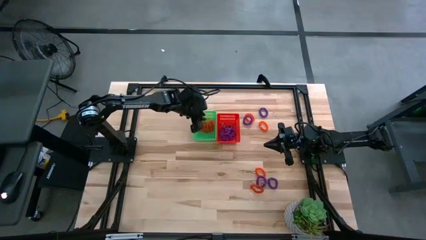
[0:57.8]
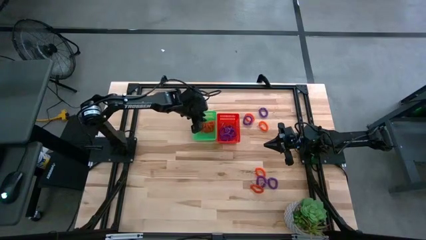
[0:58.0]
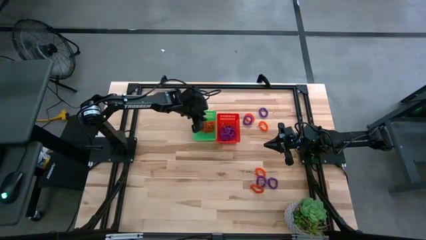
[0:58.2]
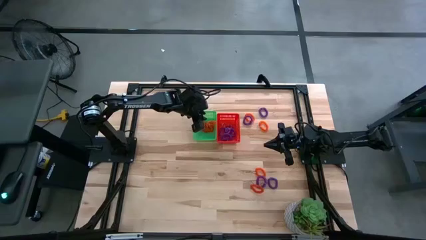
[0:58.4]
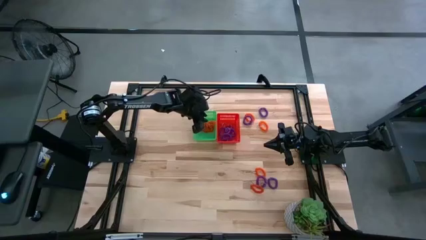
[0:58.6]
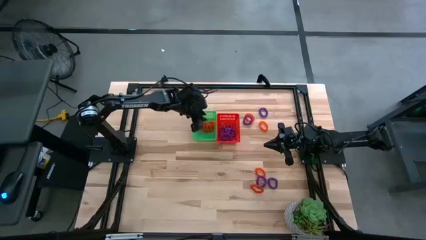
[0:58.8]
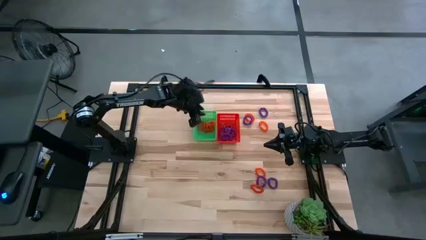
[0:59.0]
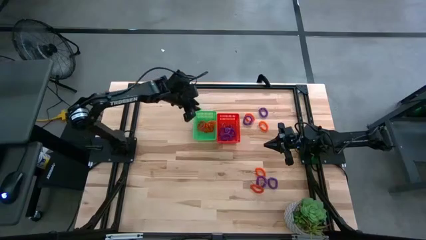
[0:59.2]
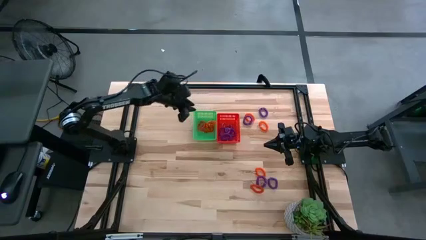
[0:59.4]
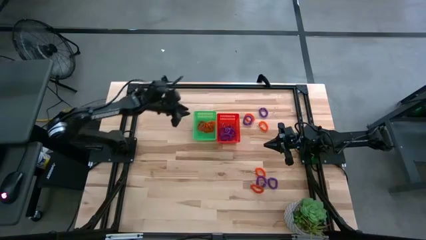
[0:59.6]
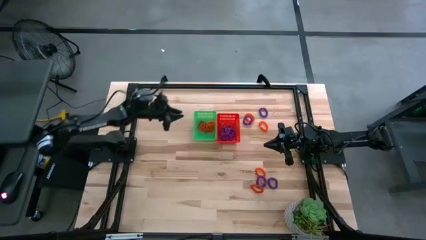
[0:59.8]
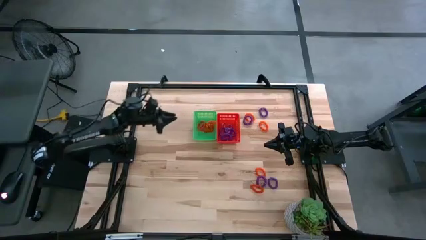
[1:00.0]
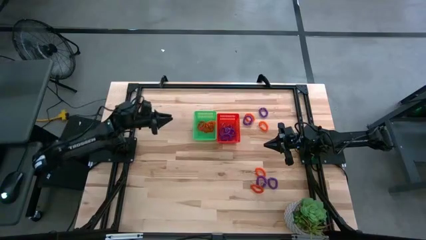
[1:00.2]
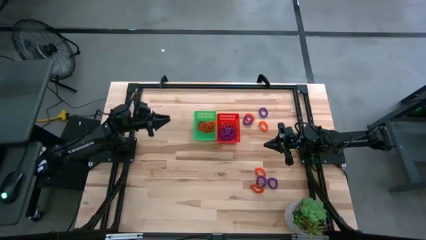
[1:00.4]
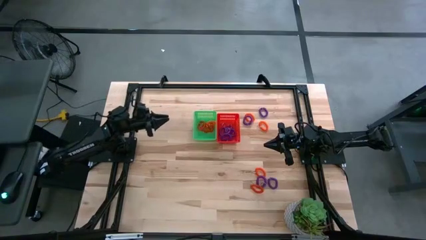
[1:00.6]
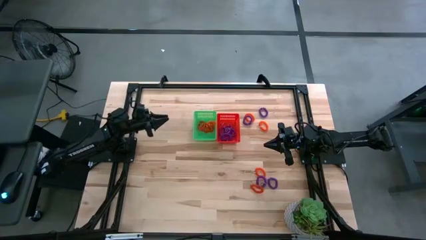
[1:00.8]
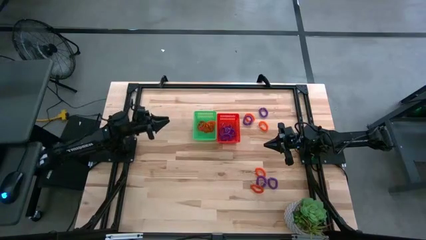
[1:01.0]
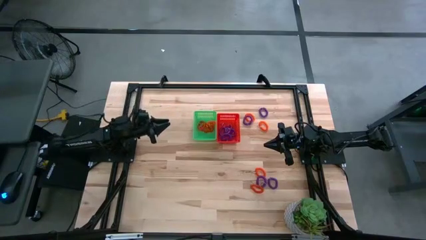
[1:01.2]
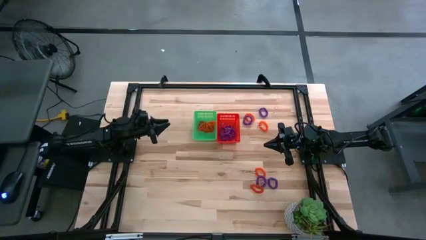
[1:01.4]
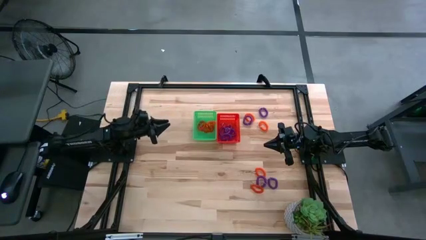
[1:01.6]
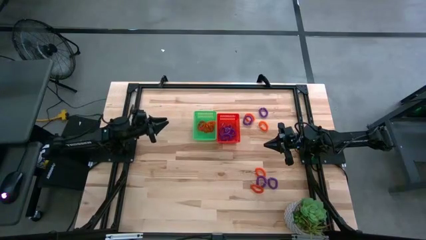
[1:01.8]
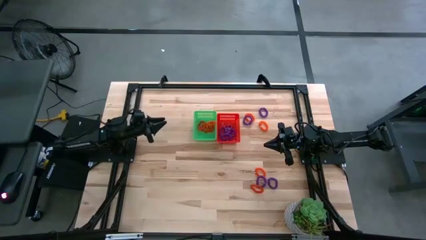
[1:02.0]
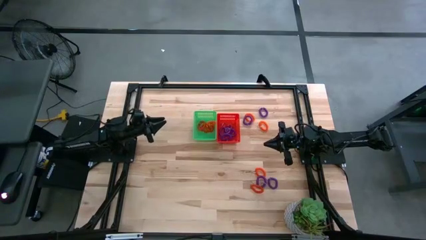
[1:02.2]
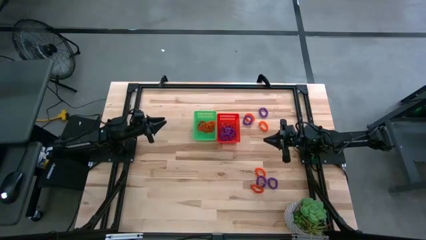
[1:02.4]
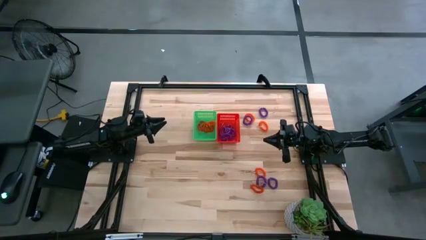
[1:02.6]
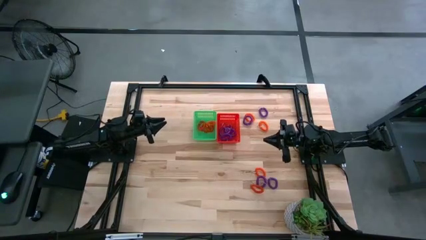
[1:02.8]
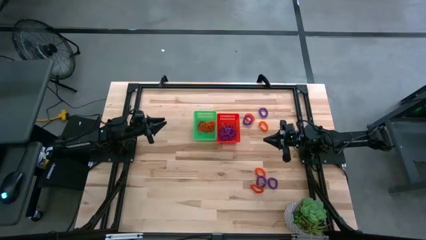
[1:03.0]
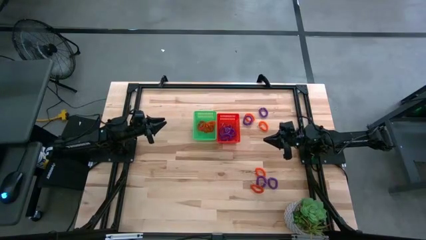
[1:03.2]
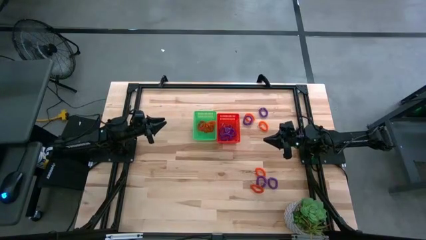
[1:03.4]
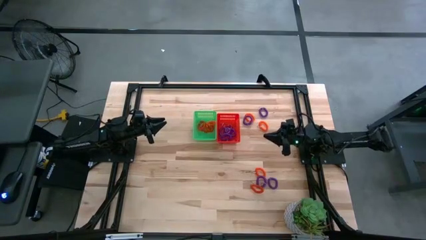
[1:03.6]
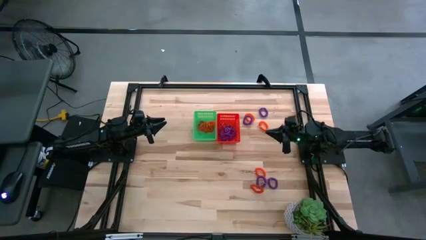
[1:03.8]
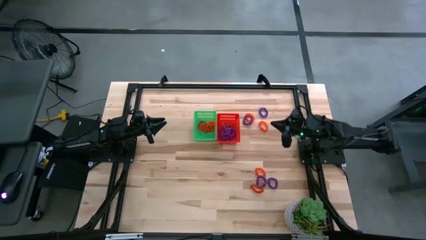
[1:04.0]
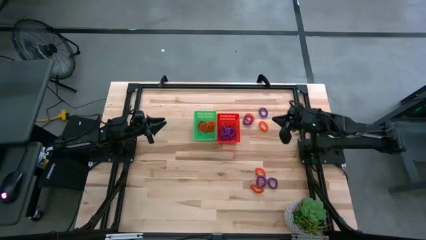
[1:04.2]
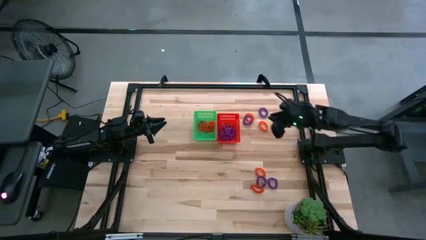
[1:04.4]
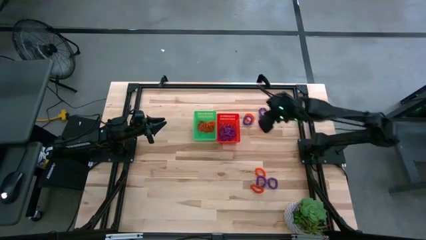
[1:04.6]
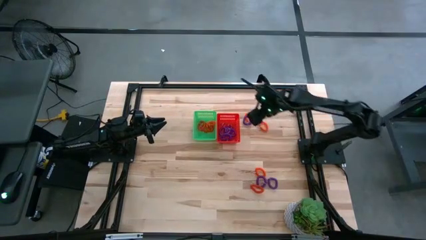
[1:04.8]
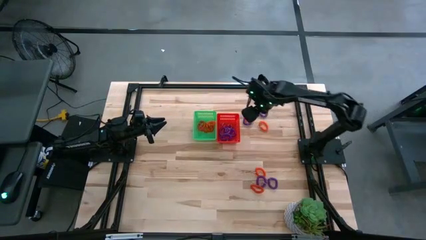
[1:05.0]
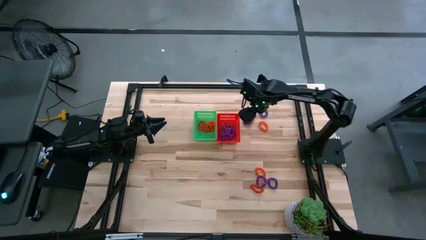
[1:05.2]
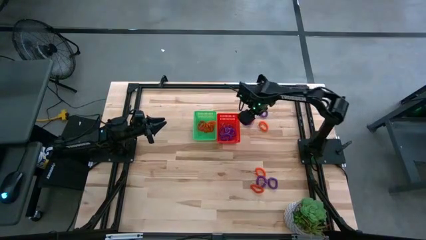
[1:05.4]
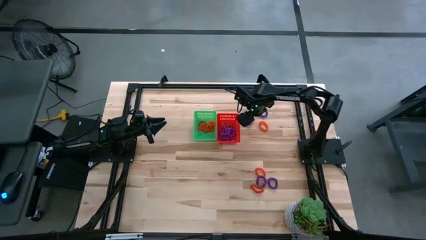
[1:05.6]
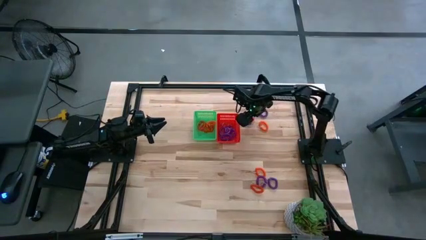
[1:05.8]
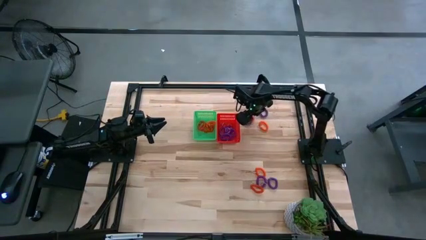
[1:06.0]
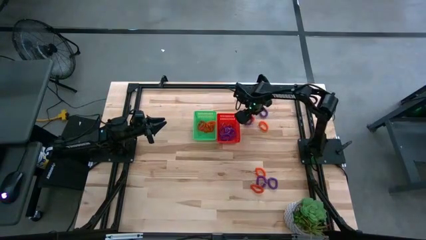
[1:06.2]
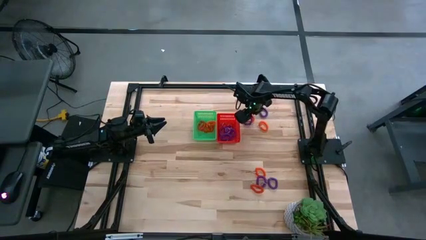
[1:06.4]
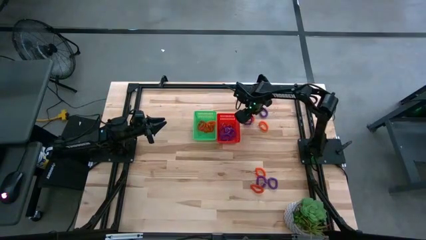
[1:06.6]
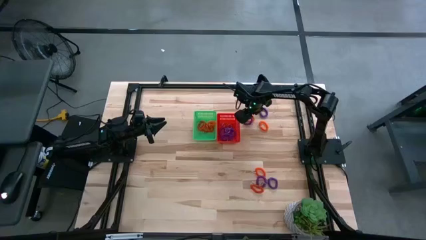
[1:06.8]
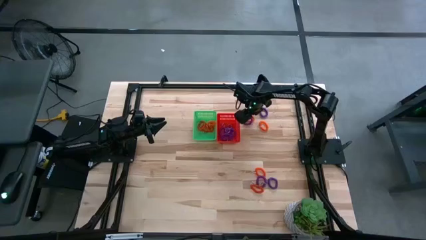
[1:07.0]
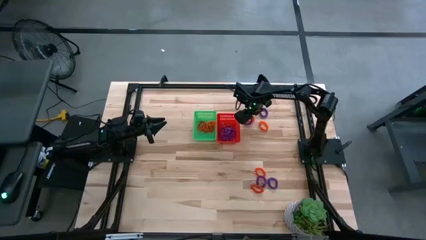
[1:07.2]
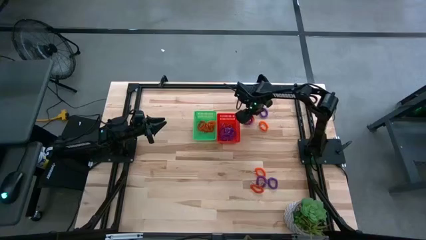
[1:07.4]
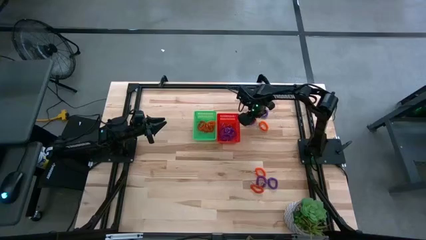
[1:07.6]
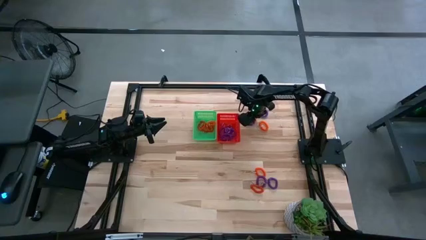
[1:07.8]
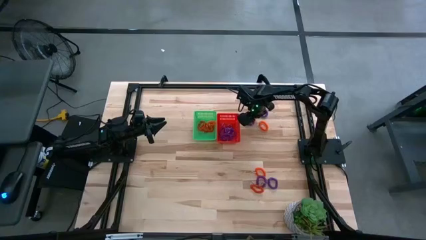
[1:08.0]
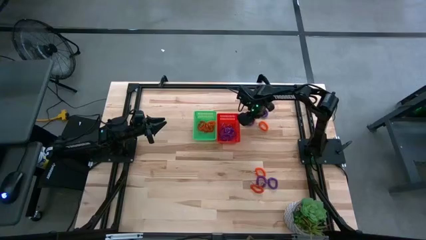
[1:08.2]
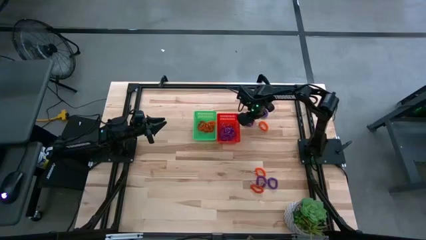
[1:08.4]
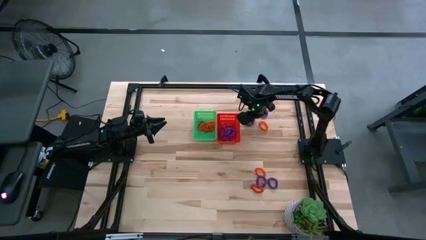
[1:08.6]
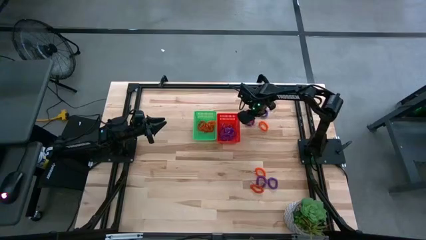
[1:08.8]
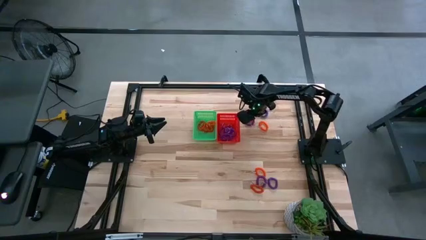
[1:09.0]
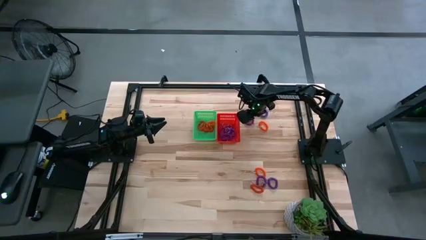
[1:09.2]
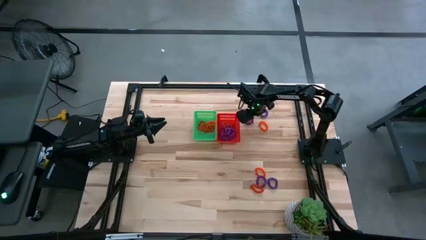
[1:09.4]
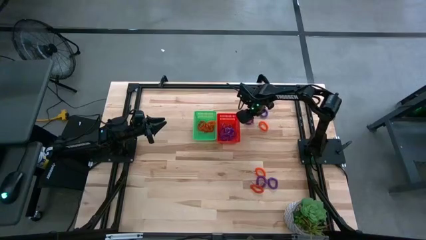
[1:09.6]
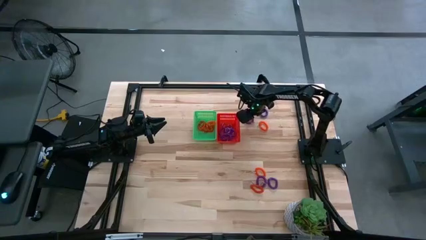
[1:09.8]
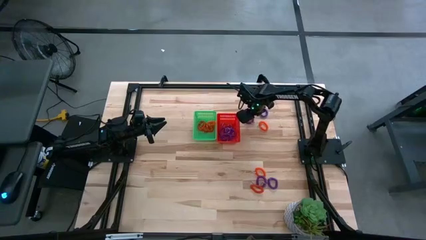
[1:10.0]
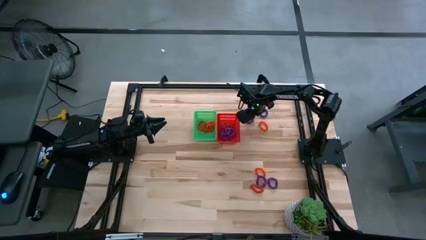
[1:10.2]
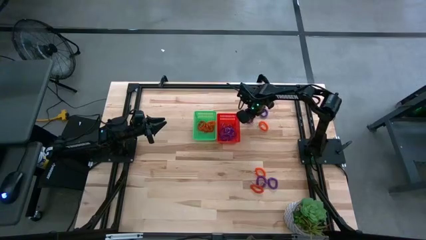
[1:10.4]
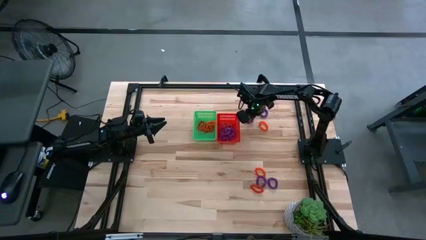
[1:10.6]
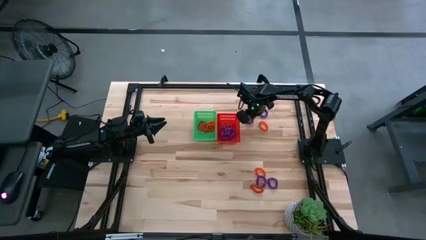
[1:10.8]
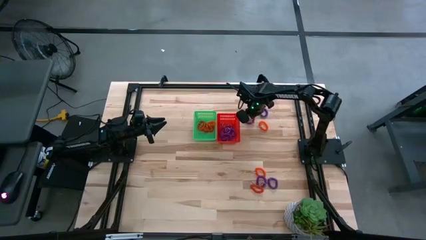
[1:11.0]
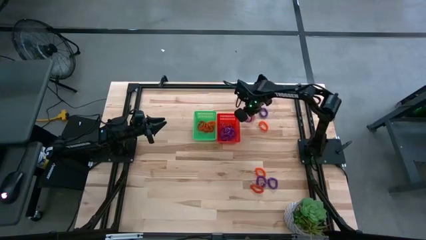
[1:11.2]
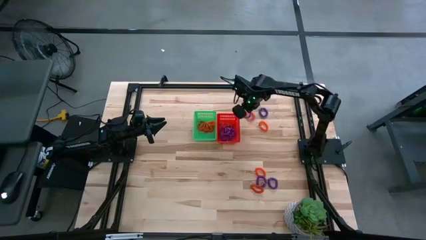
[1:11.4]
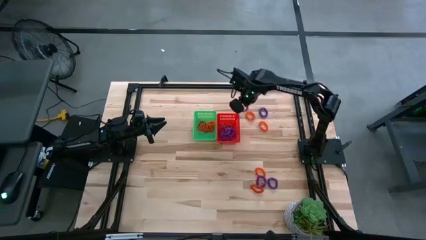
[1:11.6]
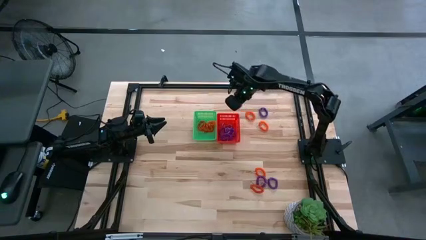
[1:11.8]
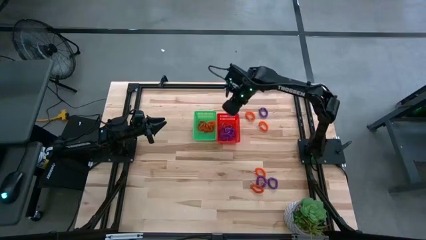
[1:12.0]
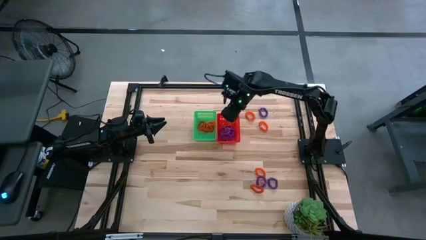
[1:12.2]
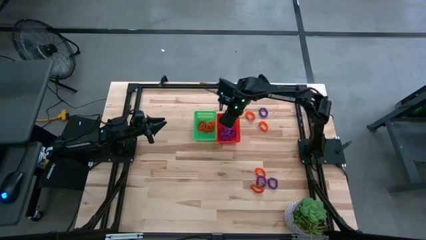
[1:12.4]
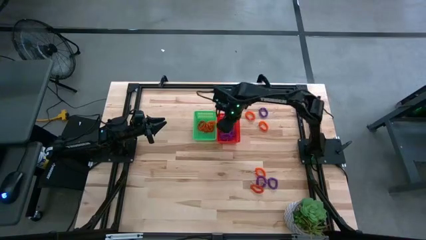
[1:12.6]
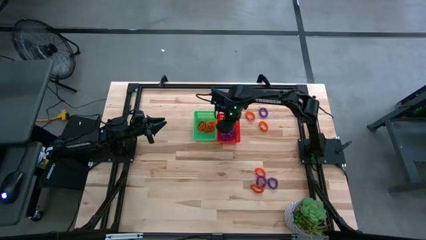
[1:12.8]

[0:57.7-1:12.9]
Task: Sort spring keychains
Put the purple spring keychain into the orange bin
